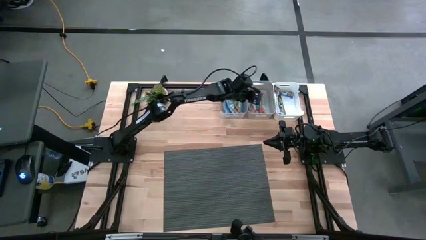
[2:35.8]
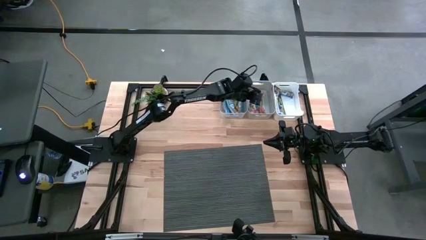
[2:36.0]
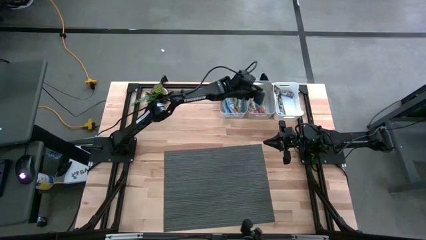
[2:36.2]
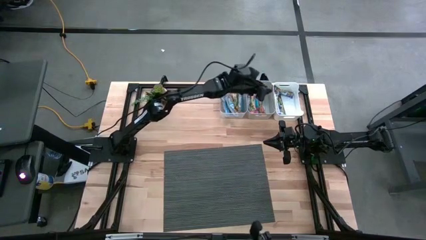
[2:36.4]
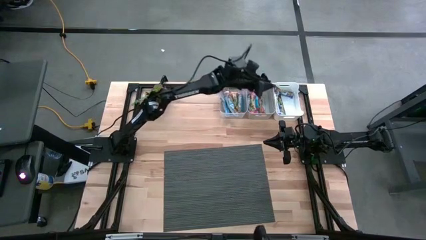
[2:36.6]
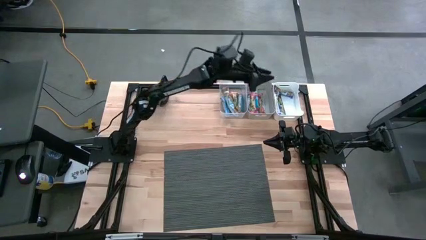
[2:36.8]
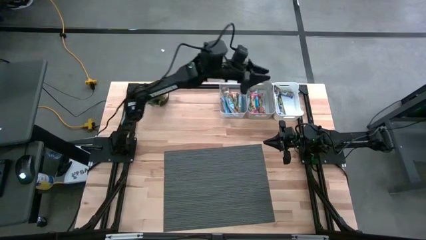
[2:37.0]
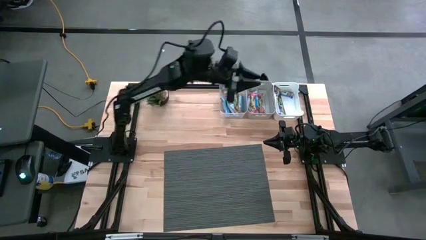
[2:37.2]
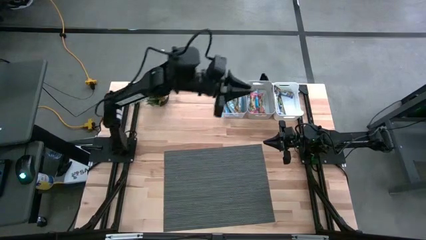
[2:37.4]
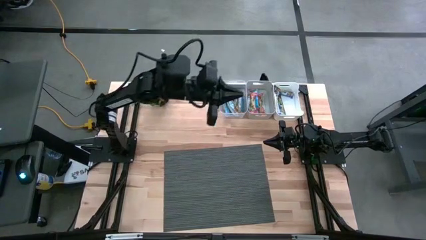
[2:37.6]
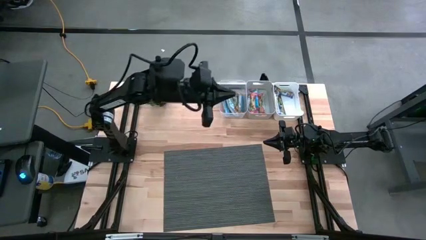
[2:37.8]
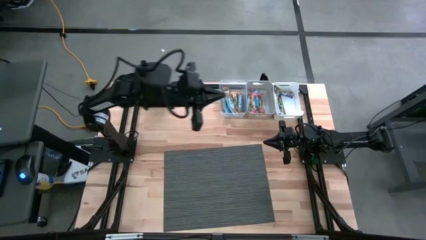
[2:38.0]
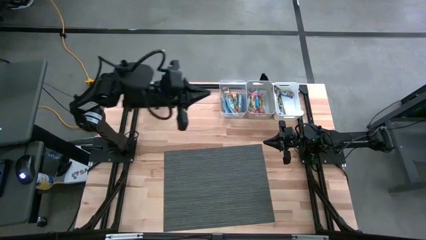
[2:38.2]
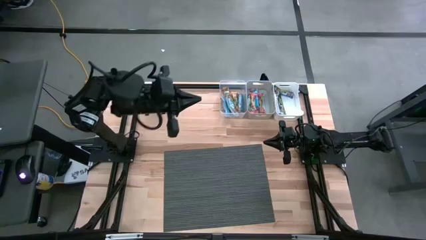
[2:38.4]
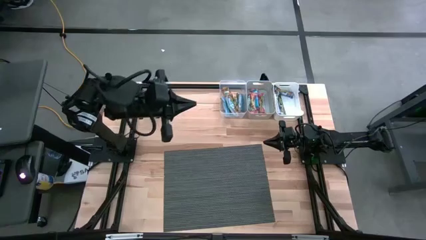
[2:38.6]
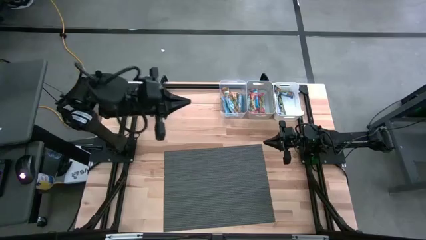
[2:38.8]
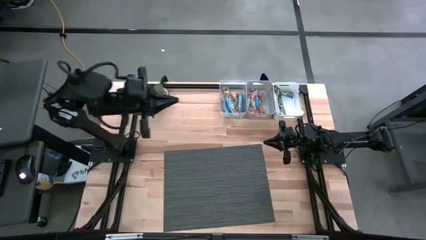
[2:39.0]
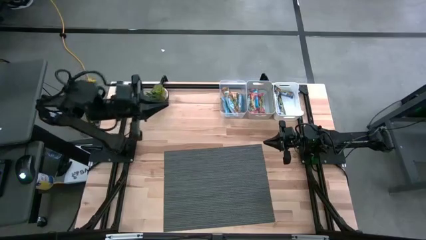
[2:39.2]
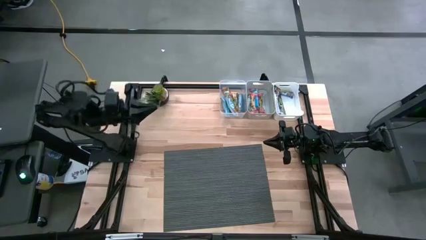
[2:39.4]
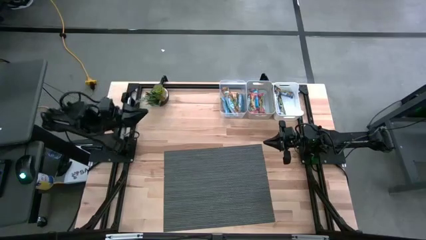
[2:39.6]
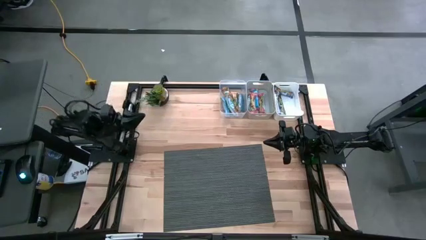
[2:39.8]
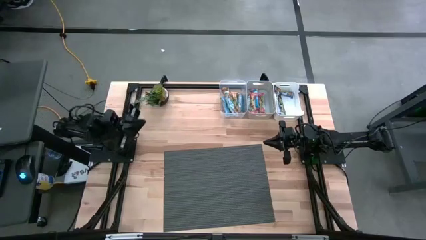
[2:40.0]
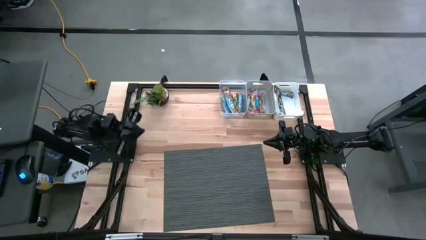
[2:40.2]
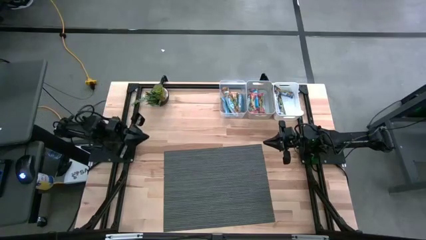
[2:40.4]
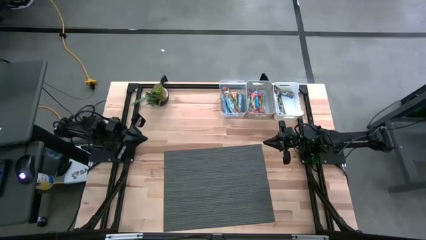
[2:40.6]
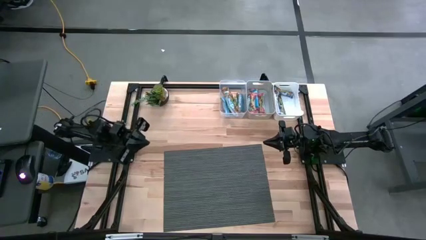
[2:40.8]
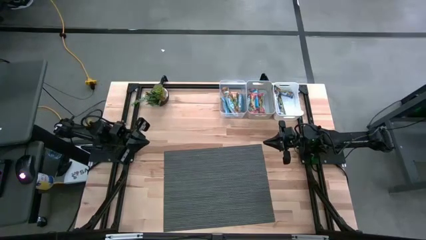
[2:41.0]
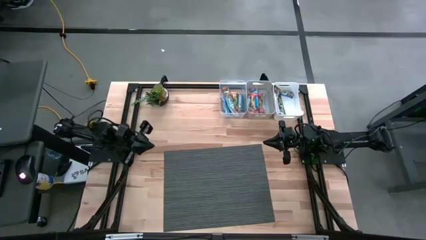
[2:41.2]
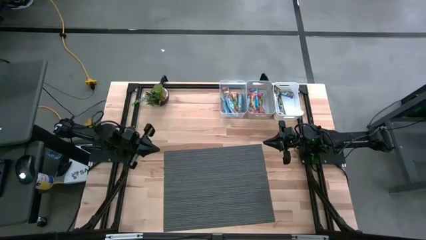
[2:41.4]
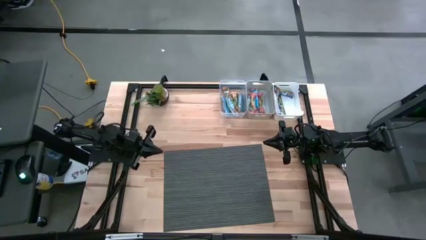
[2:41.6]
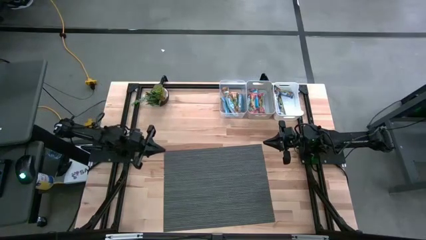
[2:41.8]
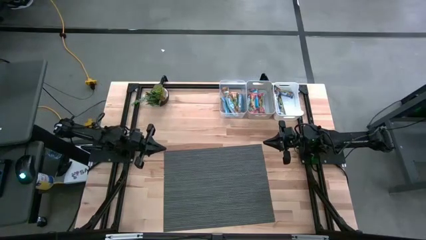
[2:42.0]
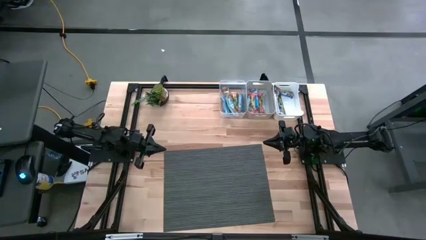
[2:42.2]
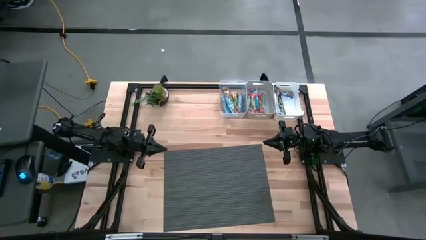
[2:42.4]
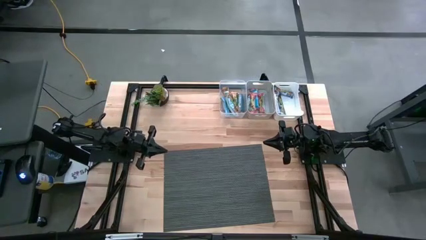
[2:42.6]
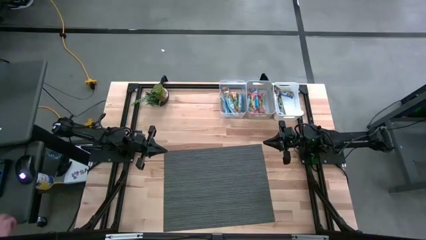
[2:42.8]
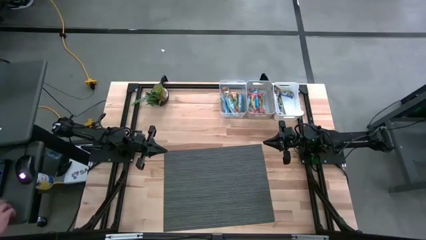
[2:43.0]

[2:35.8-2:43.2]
Task: Pick and place Granola Bars by type
Return to Home Position

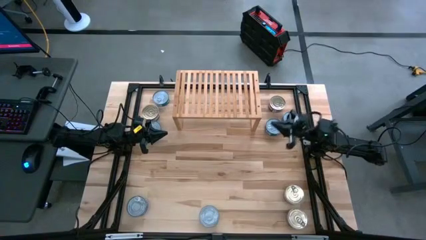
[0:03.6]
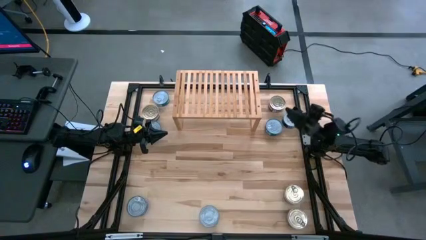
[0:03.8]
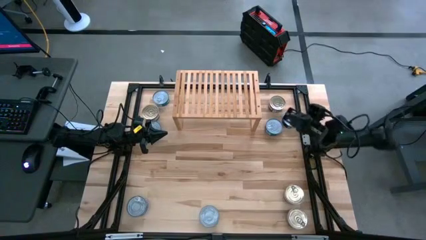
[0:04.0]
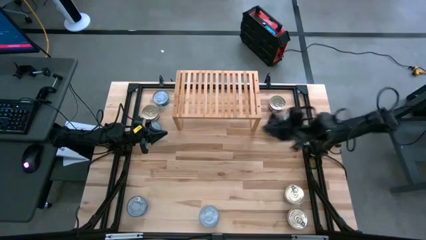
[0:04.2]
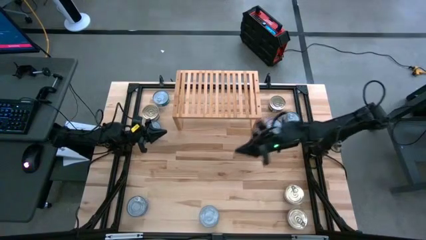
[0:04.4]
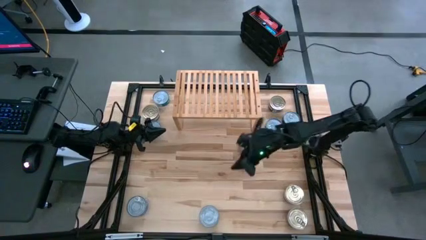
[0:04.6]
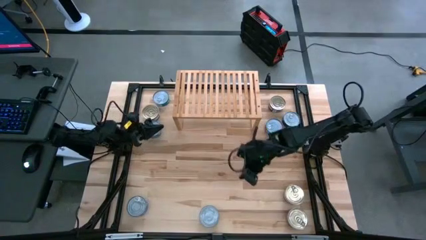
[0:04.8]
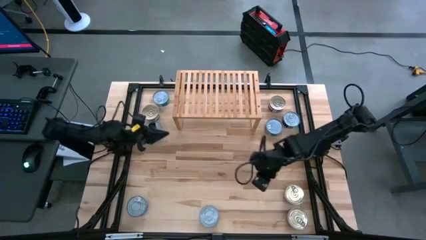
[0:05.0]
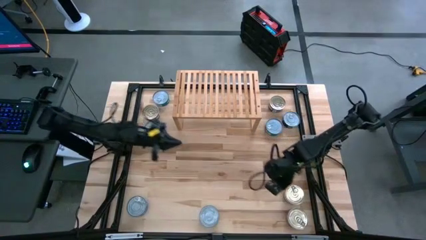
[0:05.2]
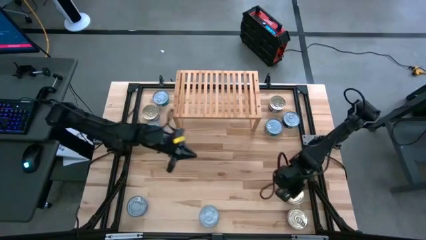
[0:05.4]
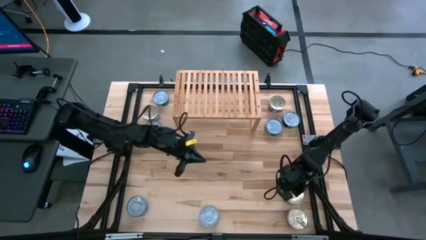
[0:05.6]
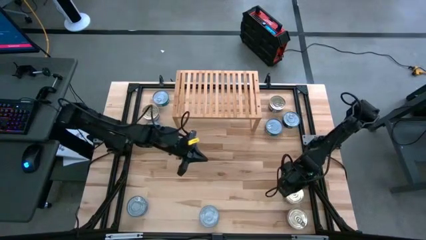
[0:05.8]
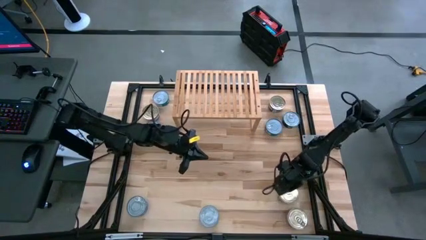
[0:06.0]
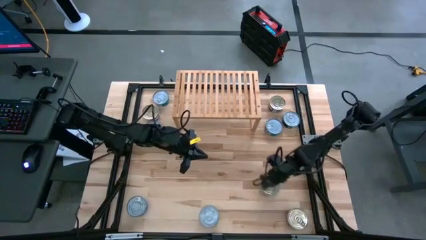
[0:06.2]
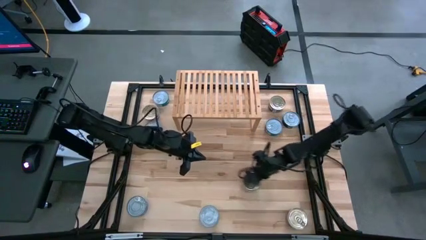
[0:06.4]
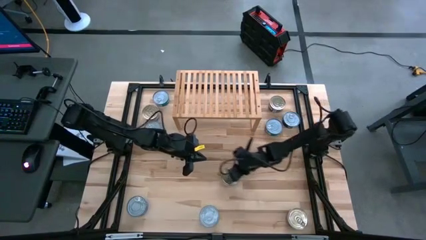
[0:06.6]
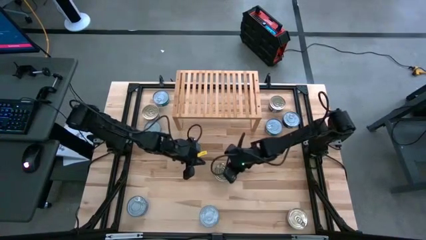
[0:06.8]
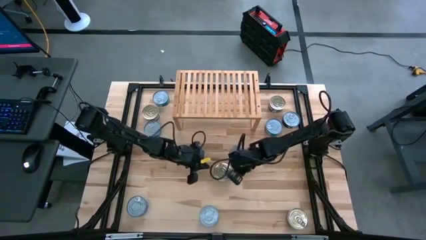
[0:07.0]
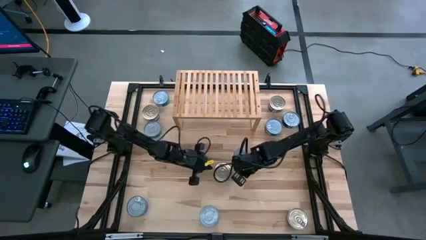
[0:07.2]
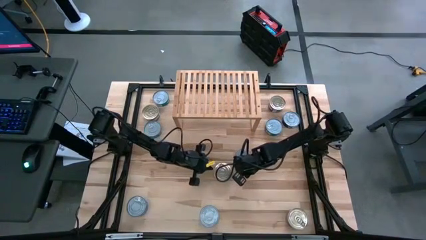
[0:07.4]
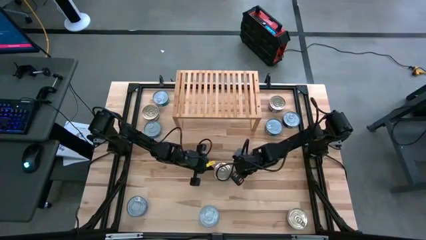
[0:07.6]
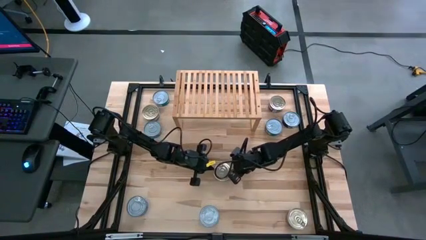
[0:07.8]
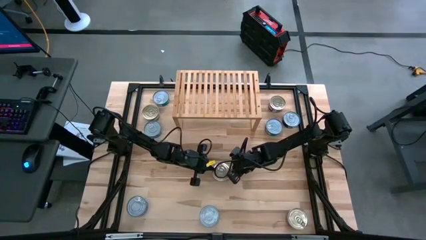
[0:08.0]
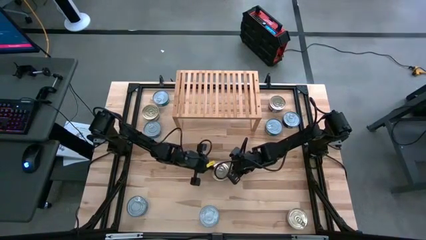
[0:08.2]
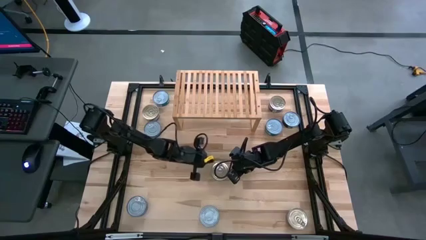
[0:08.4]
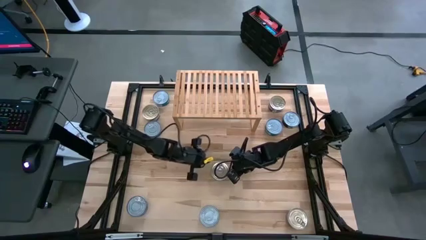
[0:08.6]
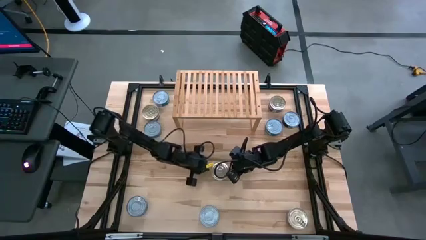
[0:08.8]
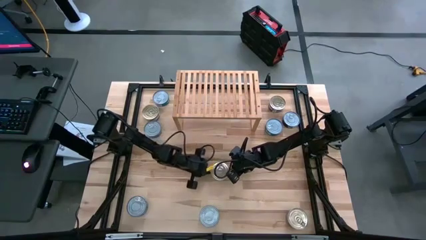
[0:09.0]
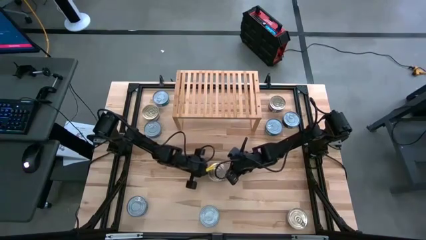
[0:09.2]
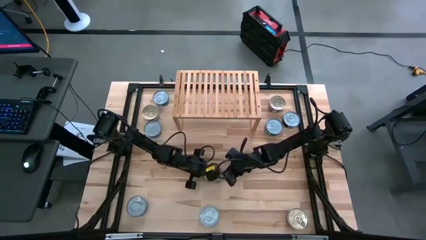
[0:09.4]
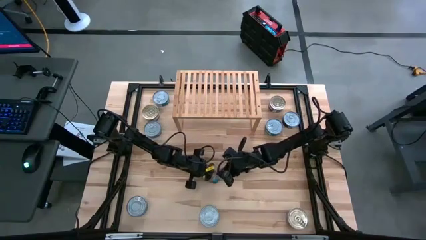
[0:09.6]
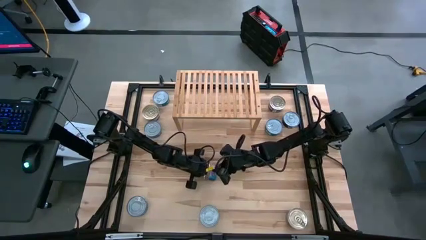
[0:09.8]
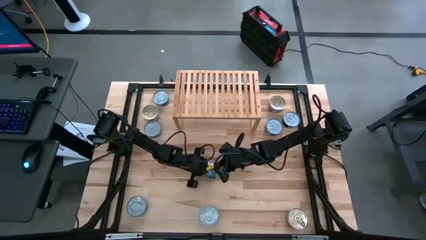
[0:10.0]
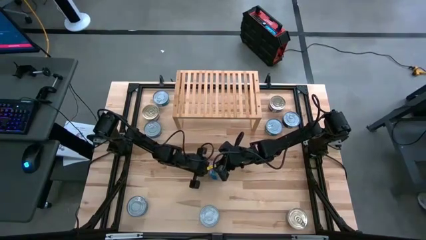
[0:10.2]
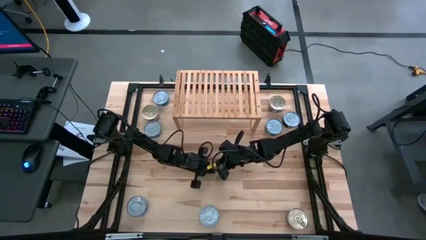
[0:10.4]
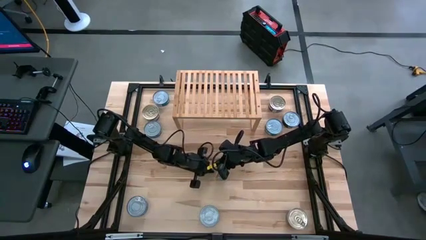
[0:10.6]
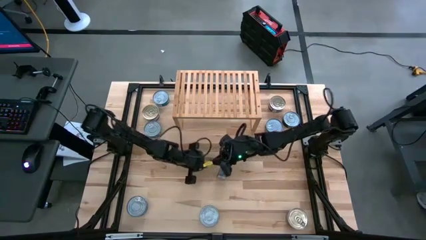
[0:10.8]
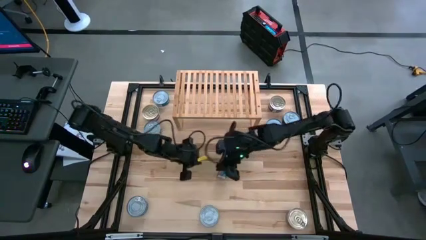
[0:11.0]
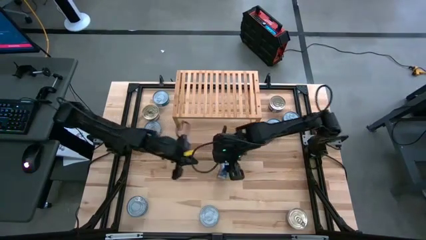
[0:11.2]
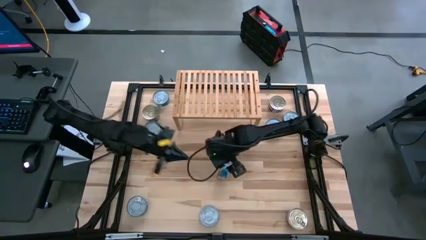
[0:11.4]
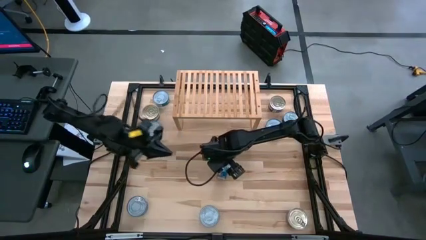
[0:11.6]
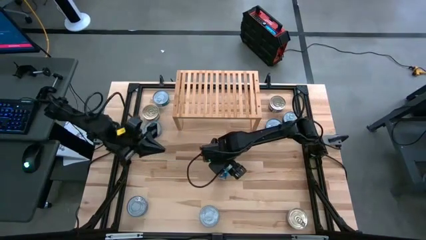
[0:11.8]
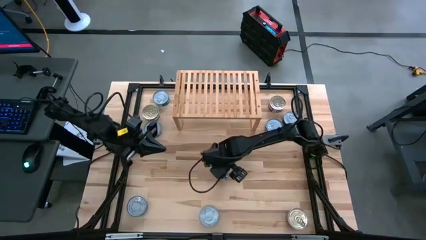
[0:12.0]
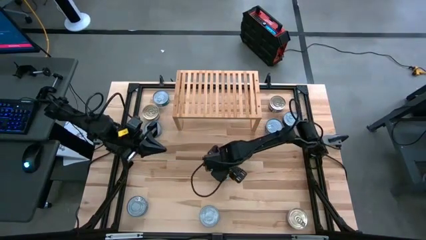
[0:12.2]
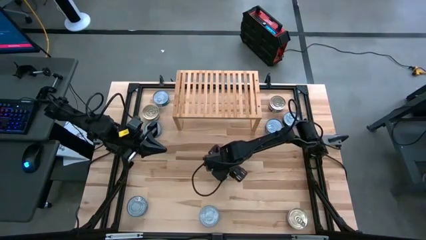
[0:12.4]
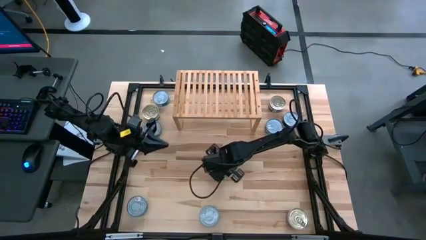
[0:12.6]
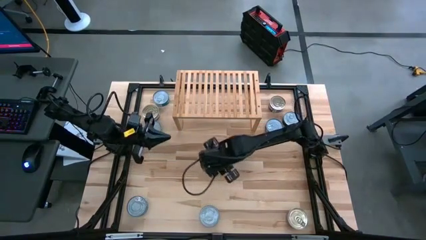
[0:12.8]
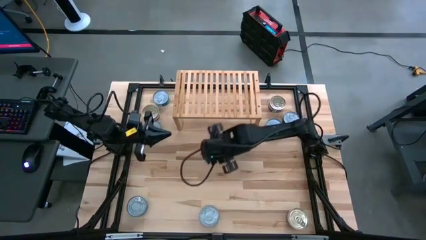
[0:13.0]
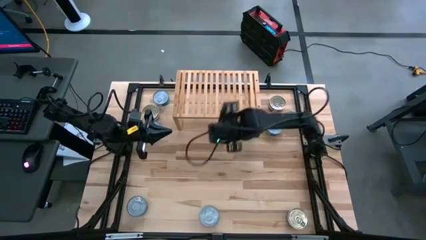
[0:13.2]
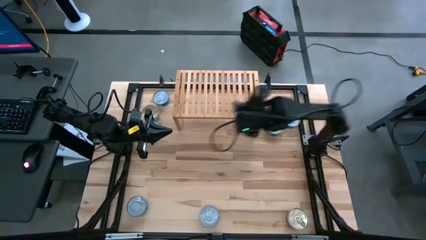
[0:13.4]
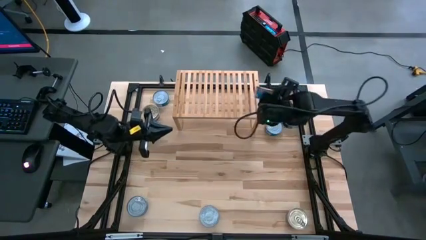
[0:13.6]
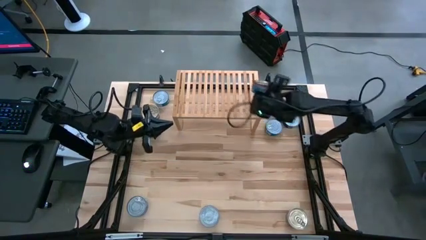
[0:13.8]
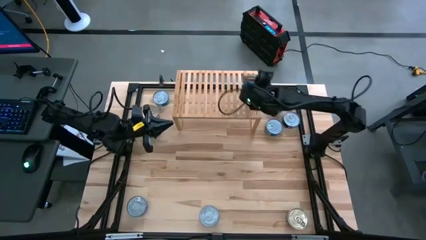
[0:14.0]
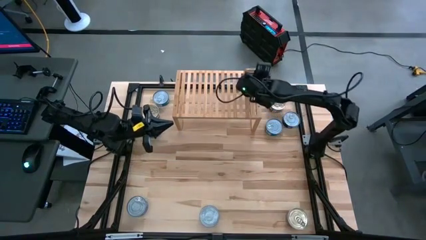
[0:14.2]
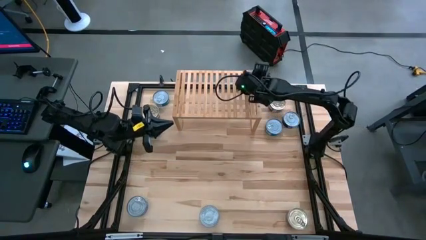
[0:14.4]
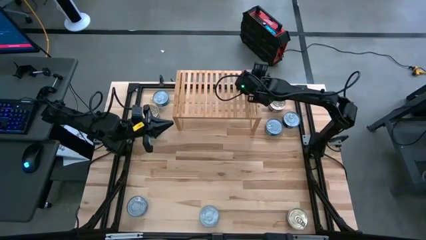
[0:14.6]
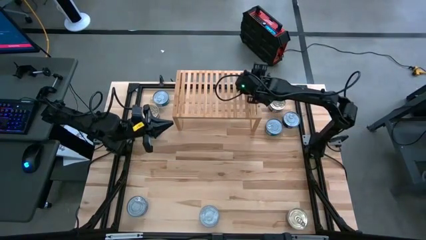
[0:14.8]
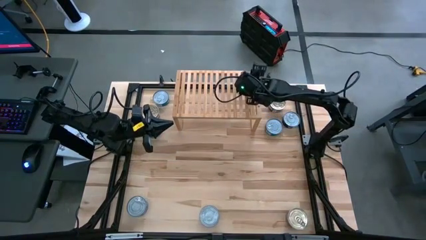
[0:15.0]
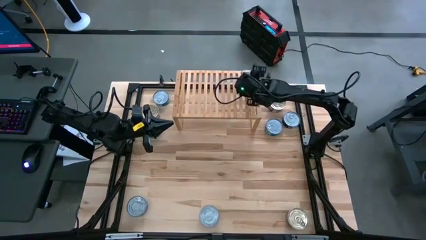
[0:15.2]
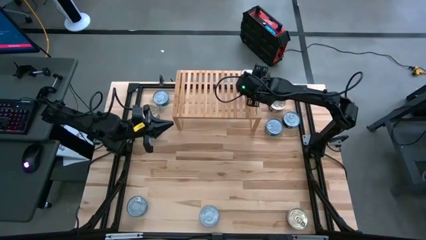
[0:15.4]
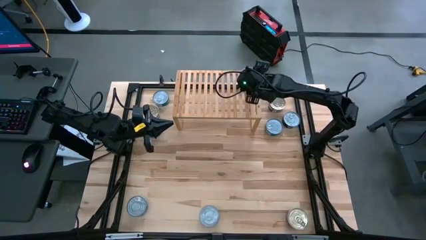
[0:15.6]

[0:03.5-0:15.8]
Task: Stack canned seafood by type on shelf
Put the blue-pink tuna can on the shelf
